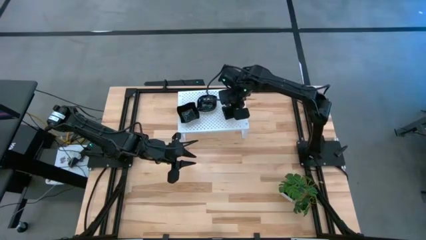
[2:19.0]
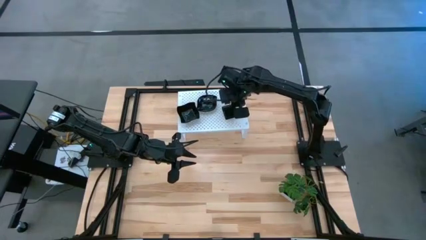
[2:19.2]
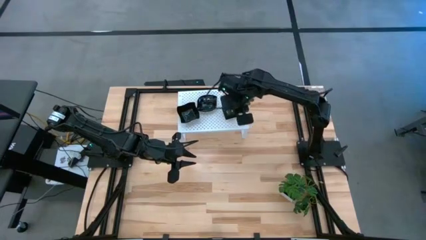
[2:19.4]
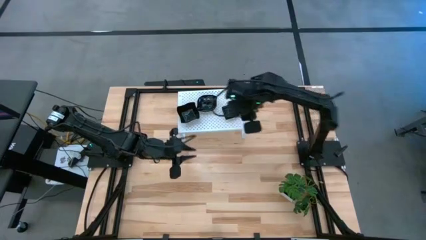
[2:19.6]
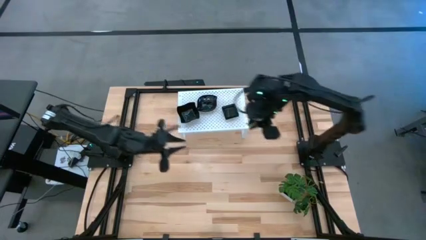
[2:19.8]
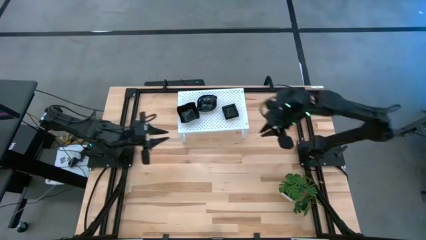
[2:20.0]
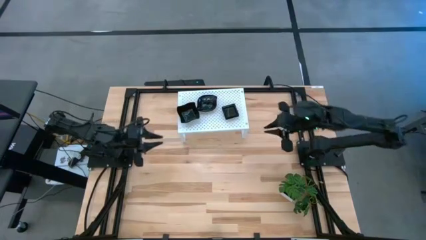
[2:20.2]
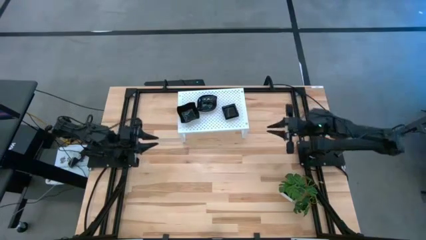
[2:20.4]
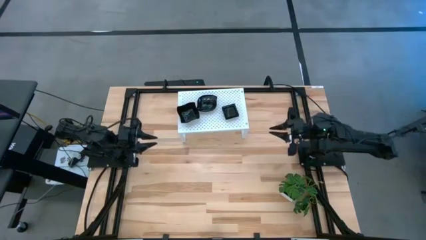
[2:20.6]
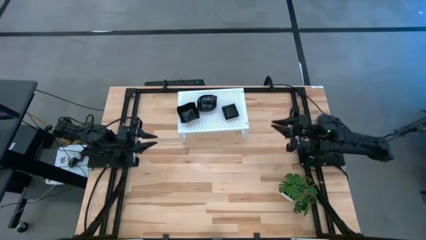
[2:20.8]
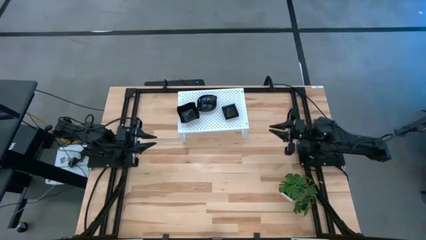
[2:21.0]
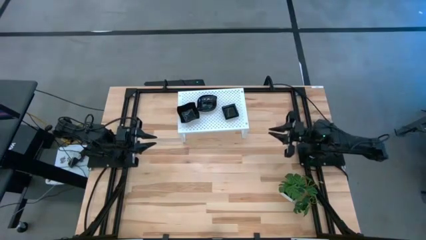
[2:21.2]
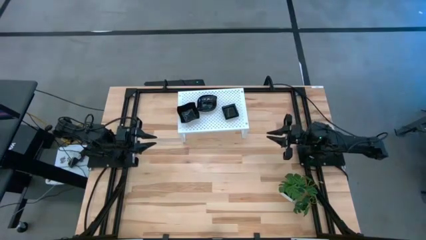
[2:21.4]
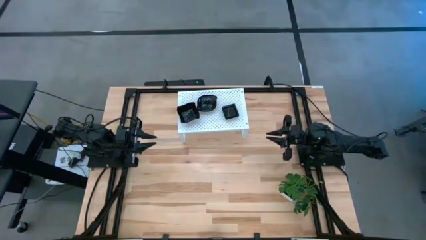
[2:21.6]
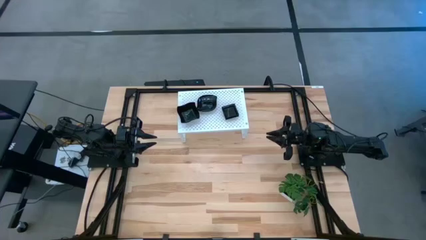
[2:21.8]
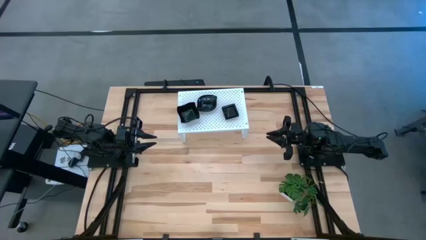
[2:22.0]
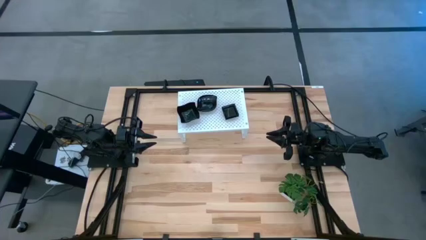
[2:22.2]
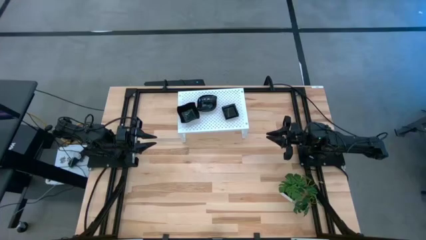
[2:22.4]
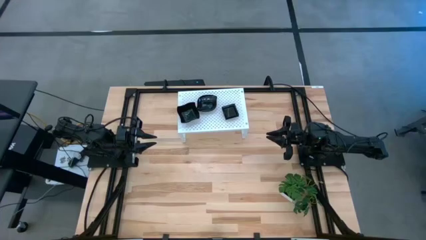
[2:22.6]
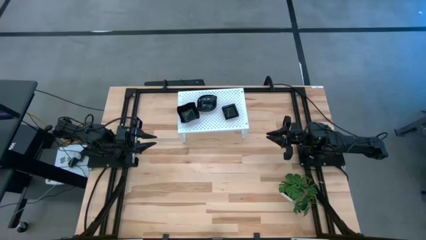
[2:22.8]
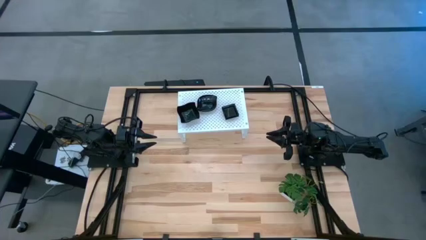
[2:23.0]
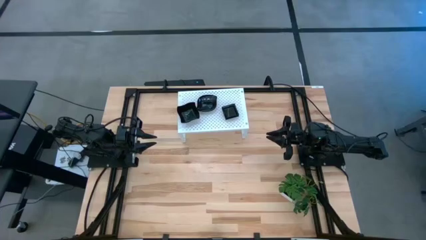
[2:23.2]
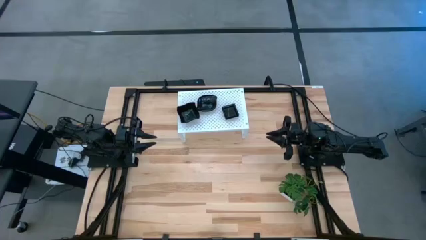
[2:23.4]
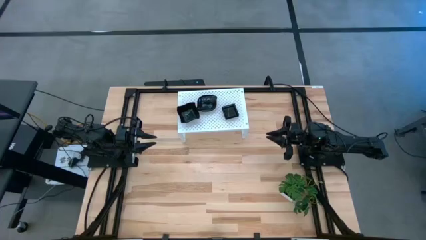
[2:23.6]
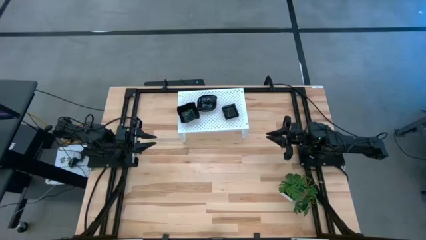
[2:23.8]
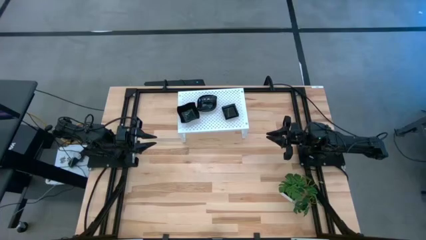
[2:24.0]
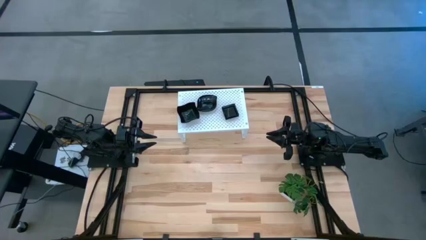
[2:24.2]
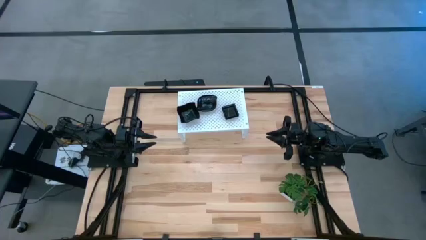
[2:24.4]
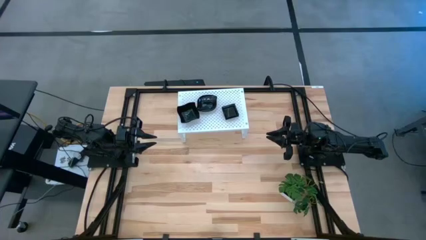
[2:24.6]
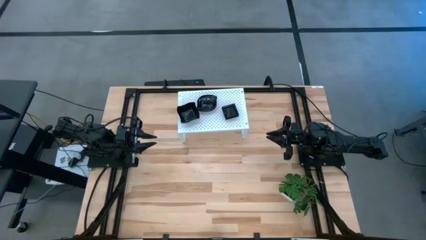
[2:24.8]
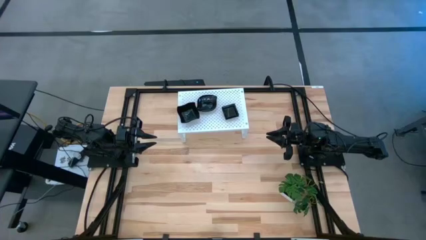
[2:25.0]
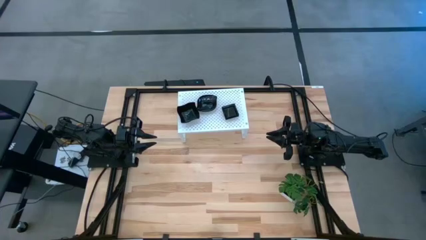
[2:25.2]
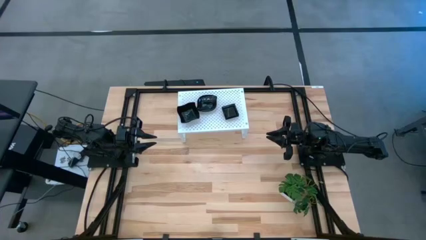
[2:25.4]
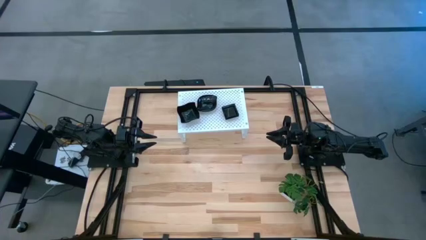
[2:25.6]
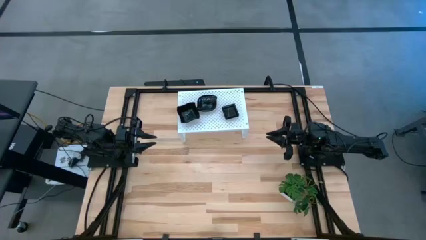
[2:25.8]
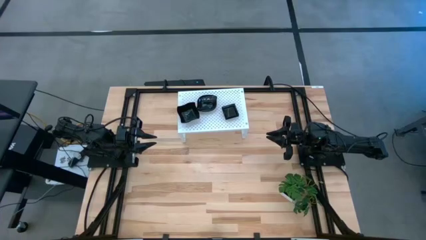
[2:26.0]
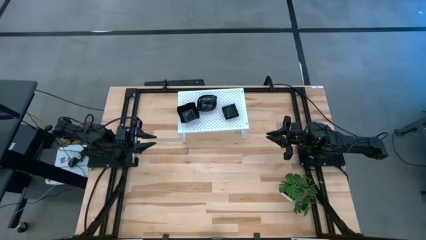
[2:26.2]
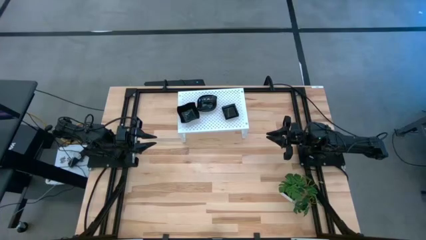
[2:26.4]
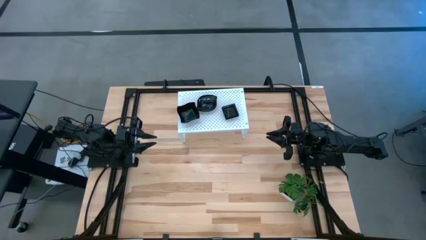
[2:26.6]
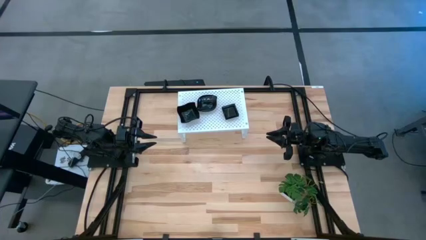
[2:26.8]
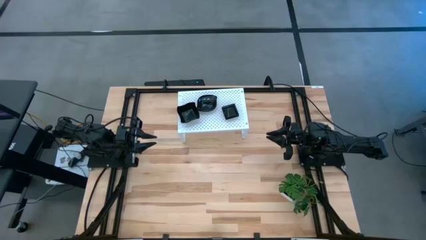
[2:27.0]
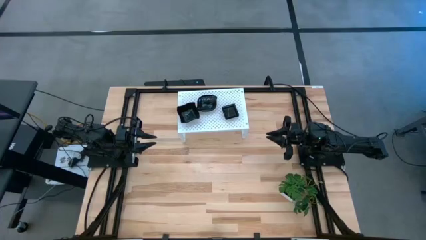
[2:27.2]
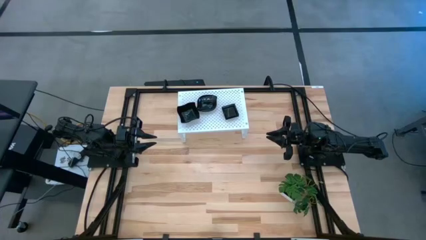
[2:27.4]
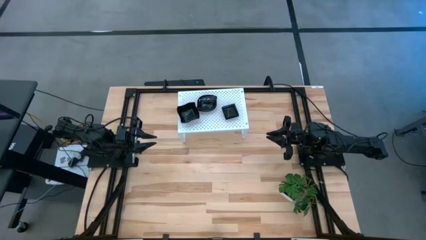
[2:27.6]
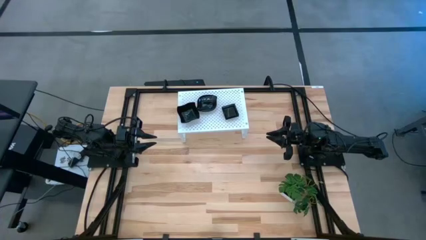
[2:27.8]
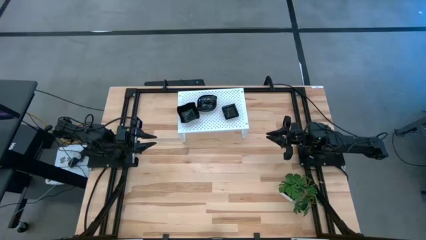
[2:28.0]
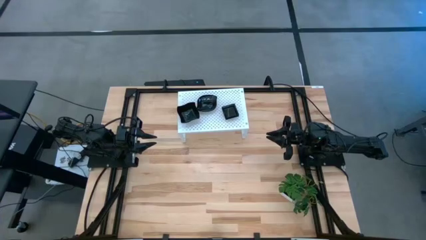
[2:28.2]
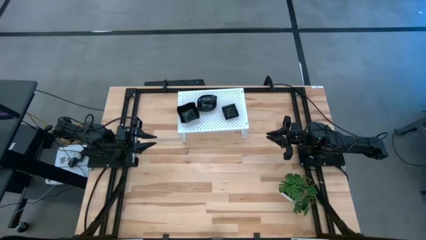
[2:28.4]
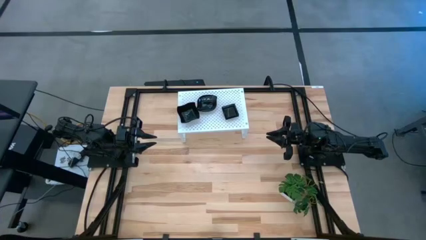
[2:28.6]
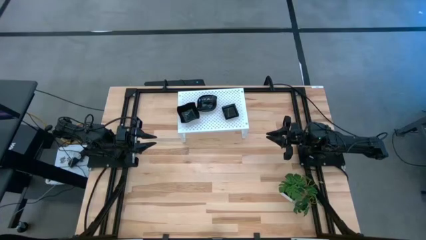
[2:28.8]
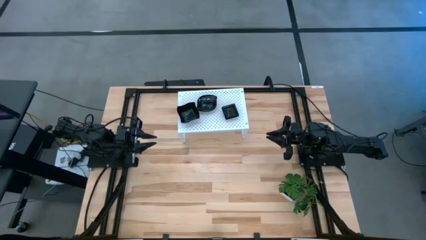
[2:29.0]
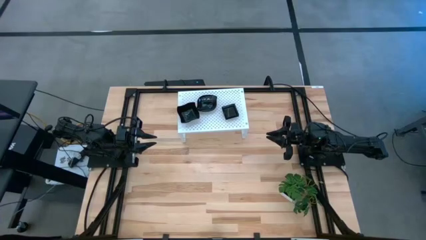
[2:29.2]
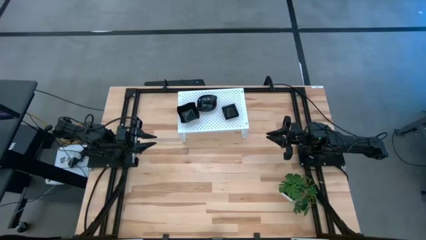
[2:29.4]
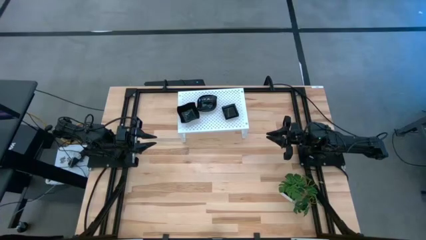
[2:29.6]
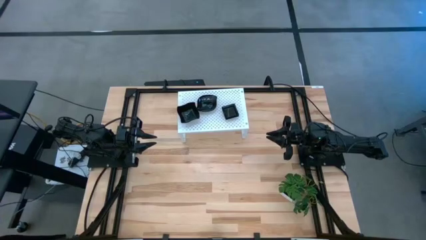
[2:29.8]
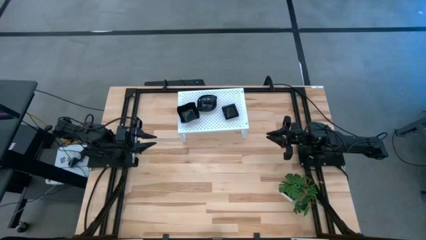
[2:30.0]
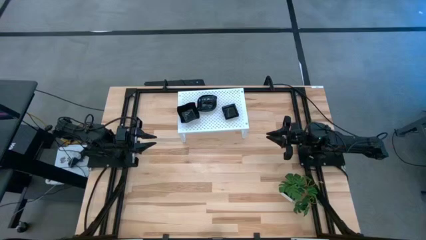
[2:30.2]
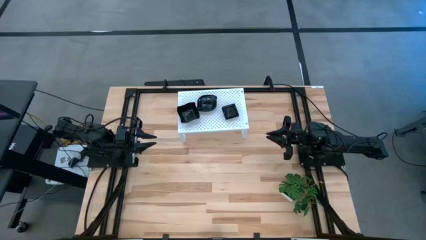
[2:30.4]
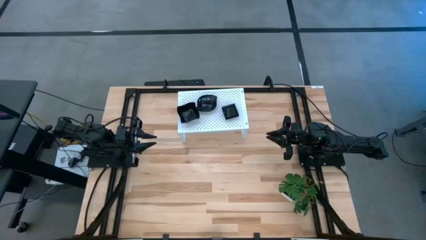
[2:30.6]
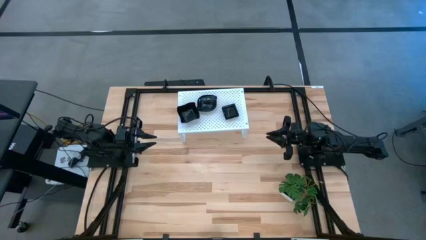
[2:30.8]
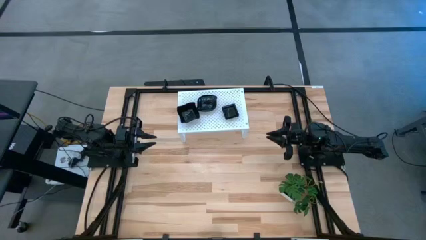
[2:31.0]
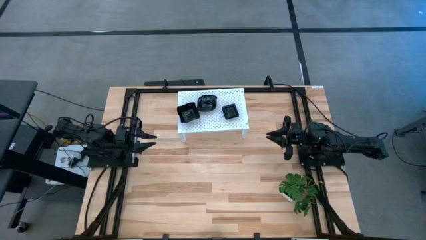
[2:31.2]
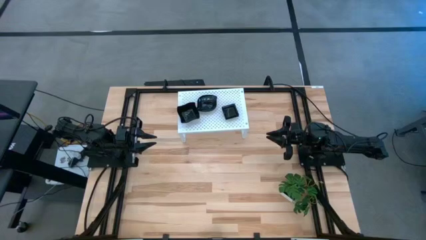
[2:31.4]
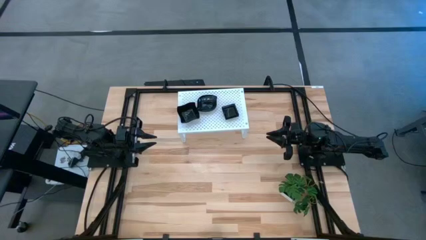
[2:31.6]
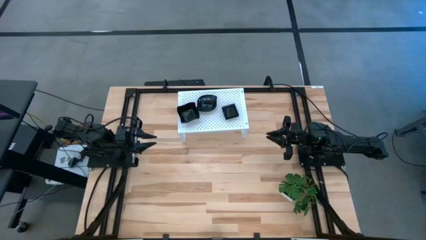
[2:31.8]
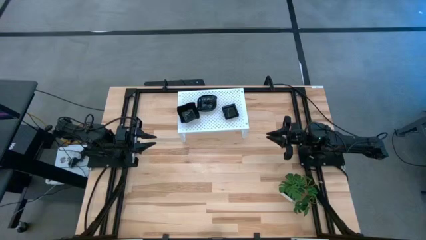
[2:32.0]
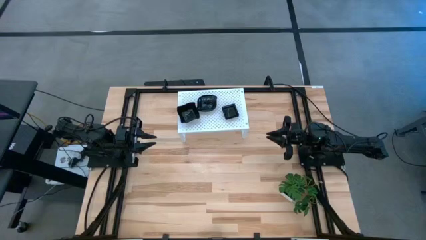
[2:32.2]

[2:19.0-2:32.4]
Task: Pick & Place Mini shaped plates
Return to Home Position

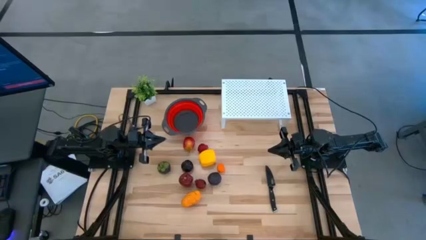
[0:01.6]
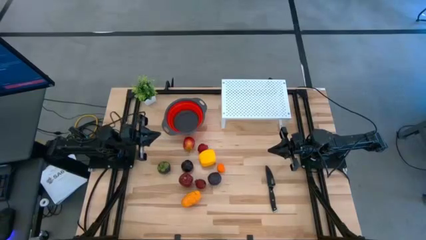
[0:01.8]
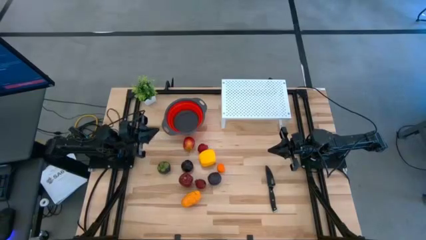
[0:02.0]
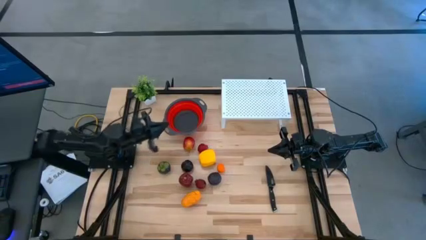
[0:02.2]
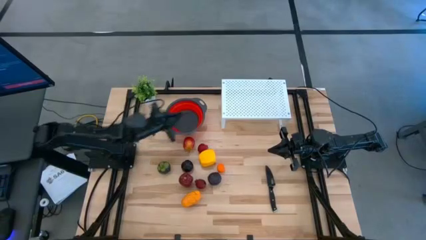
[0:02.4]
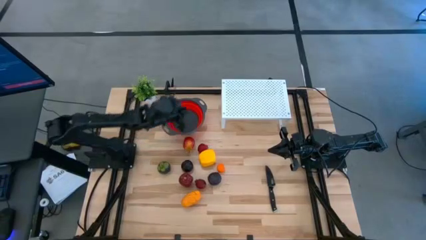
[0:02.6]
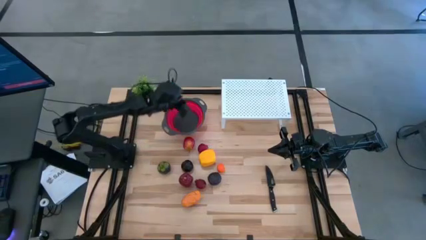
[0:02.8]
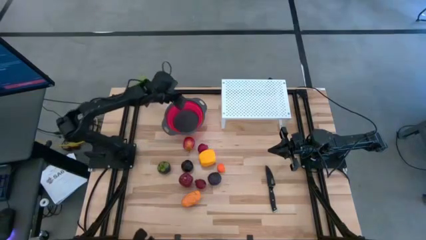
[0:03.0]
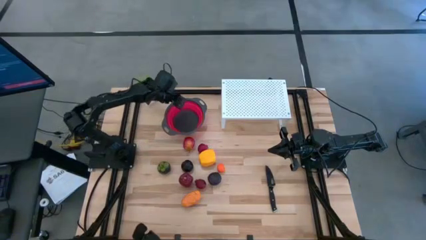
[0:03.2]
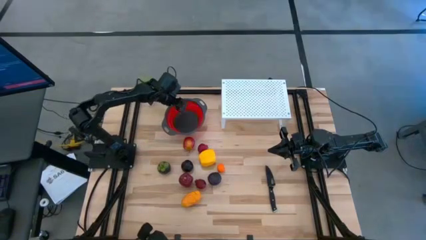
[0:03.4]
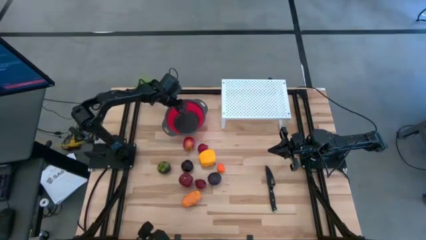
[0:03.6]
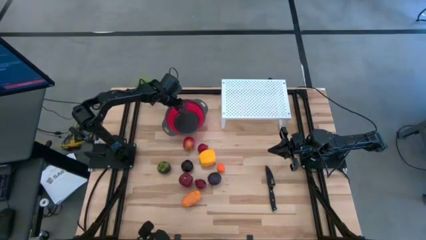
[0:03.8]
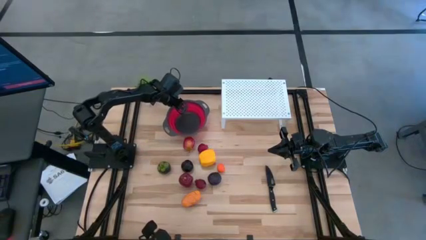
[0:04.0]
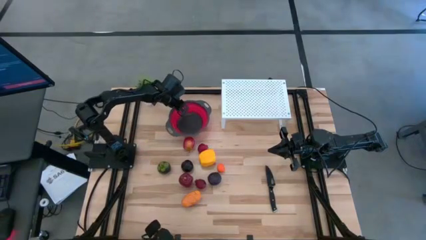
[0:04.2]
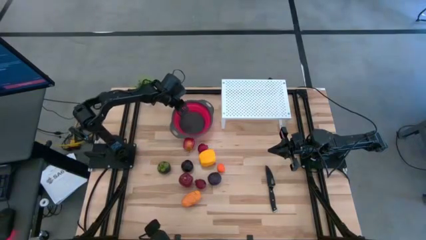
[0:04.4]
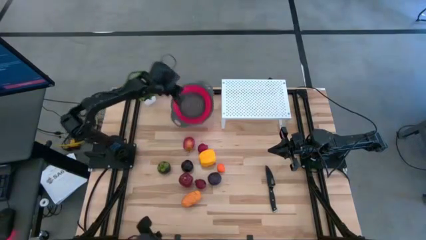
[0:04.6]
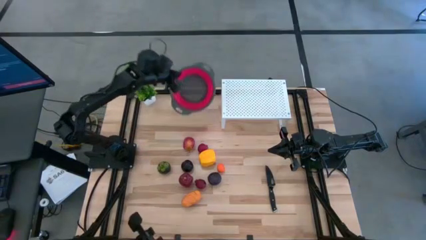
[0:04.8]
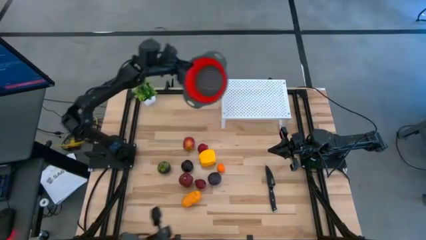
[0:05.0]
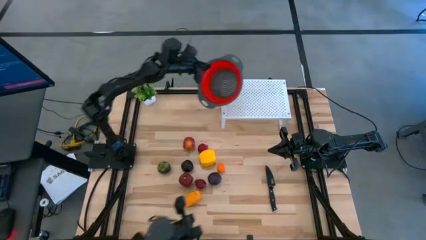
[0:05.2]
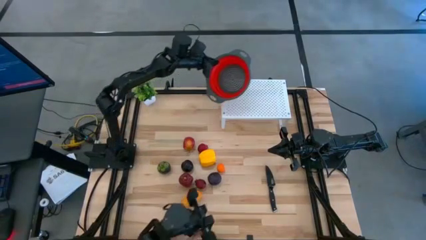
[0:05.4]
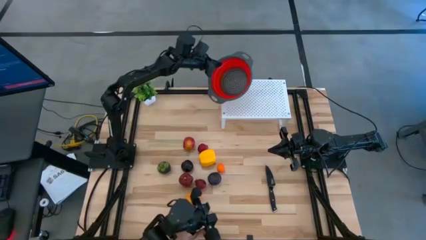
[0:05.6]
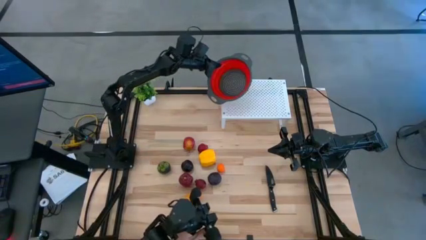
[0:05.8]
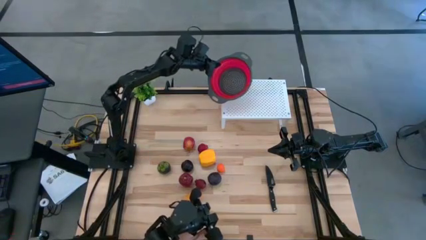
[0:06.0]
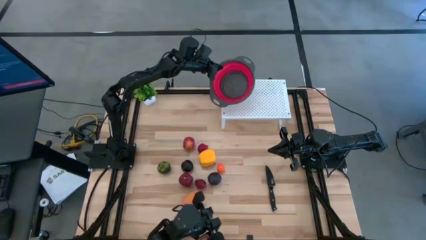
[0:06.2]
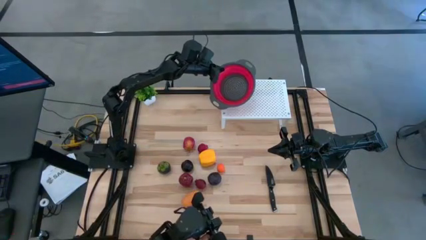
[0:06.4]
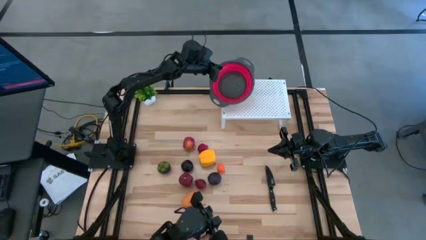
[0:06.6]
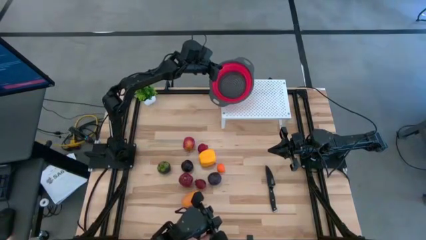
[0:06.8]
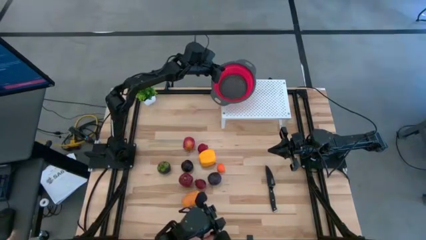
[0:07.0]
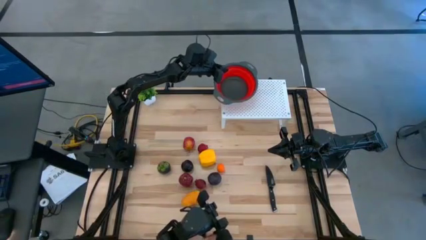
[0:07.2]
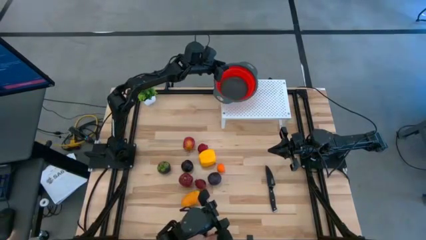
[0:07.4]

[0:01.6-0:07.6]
Task: Pick & Place Fruit
Put the red strainer bowl on the shelf
